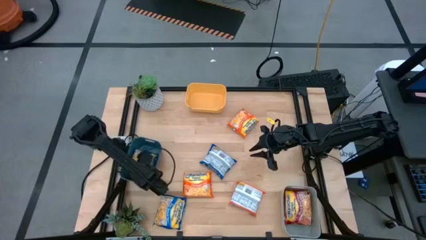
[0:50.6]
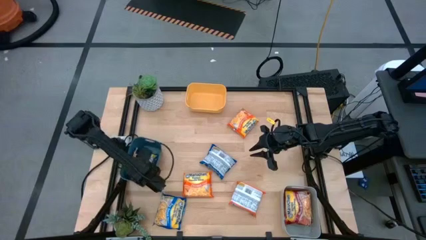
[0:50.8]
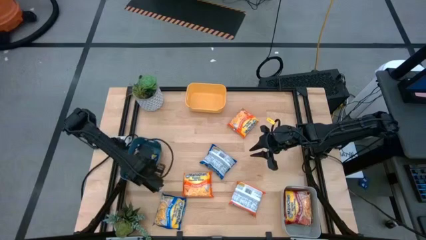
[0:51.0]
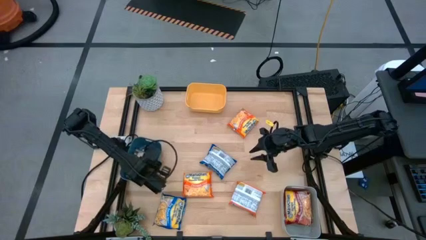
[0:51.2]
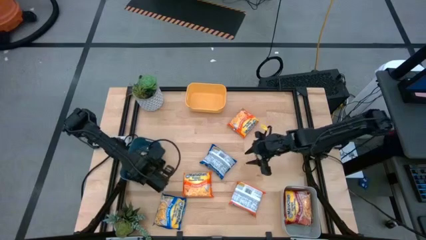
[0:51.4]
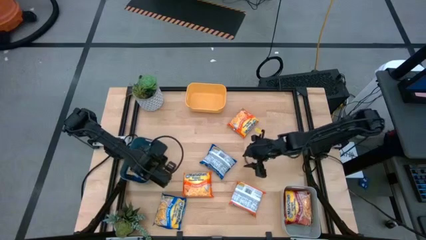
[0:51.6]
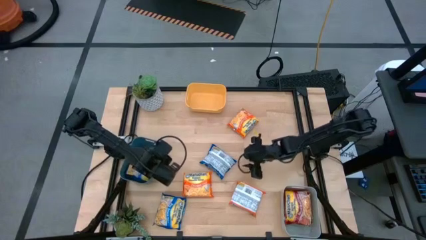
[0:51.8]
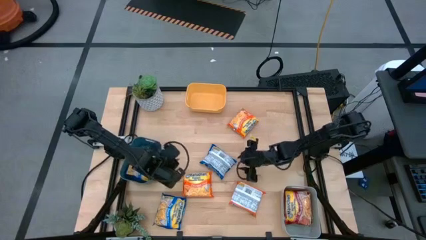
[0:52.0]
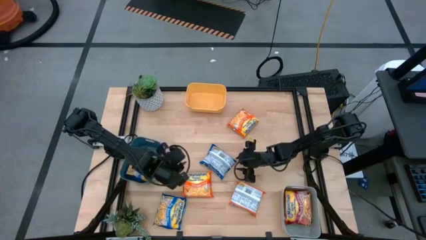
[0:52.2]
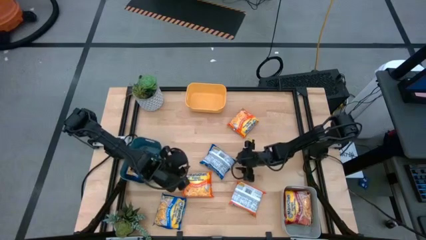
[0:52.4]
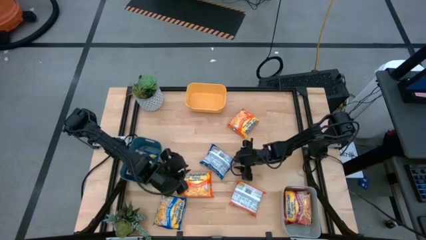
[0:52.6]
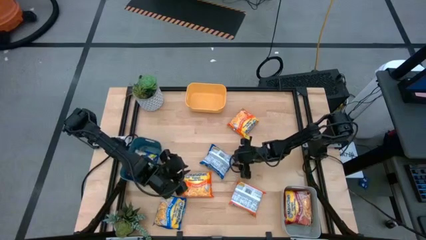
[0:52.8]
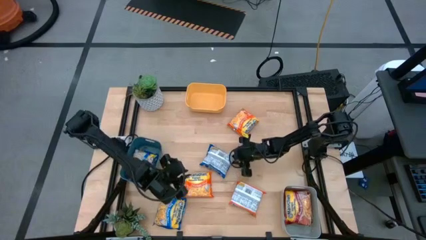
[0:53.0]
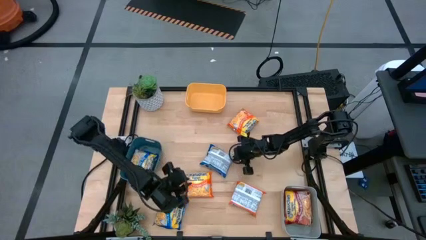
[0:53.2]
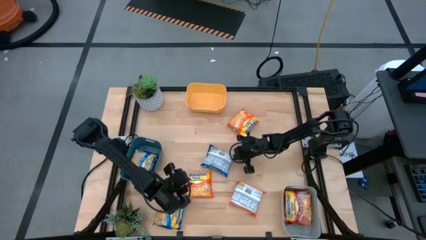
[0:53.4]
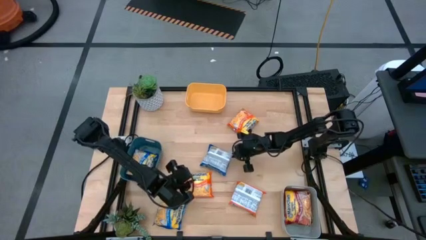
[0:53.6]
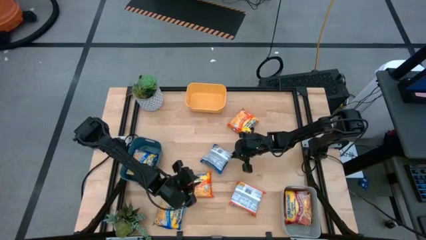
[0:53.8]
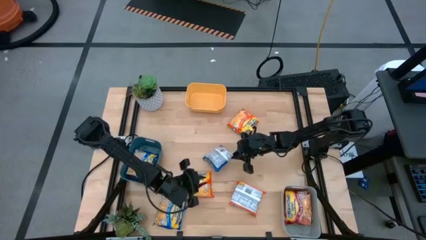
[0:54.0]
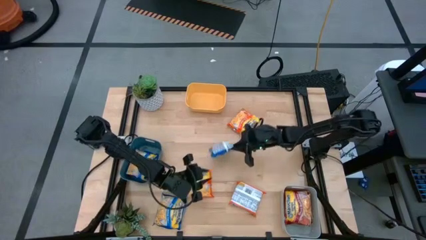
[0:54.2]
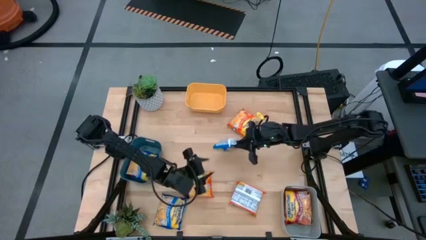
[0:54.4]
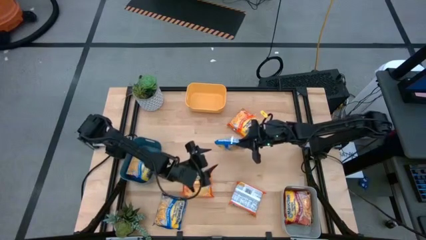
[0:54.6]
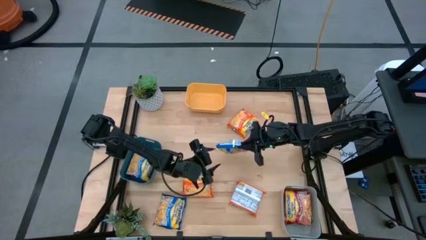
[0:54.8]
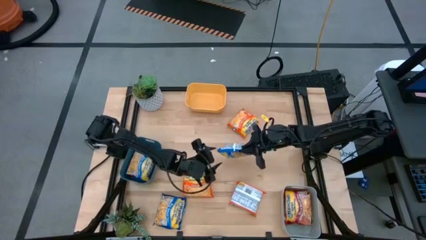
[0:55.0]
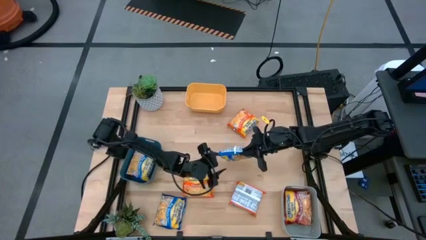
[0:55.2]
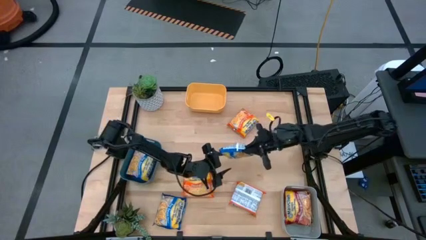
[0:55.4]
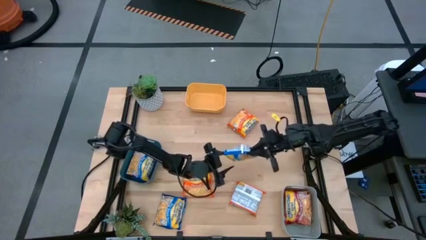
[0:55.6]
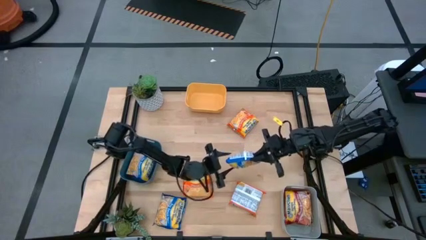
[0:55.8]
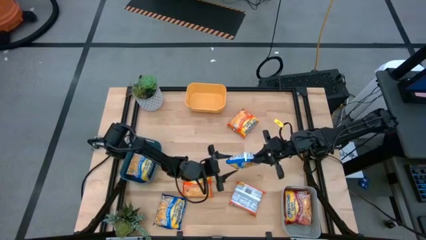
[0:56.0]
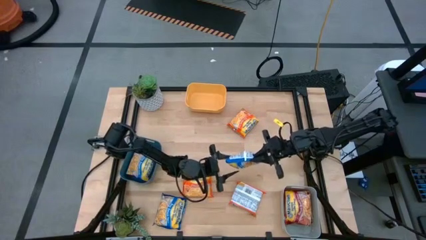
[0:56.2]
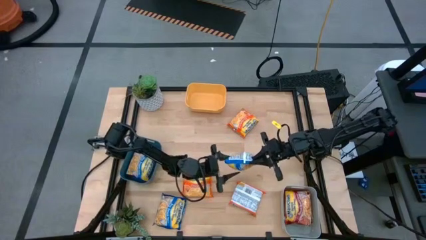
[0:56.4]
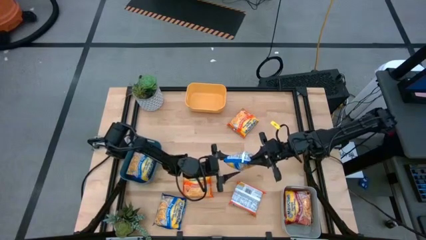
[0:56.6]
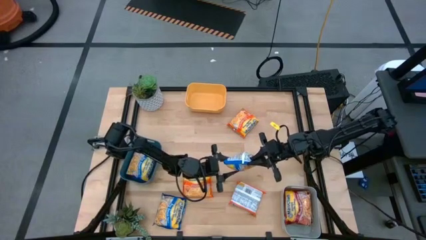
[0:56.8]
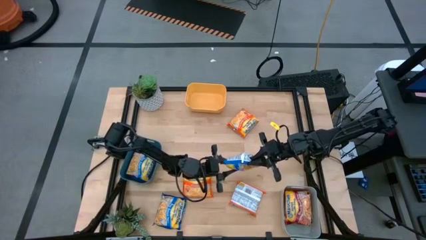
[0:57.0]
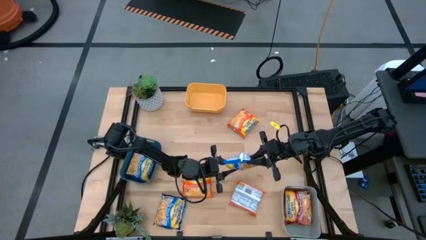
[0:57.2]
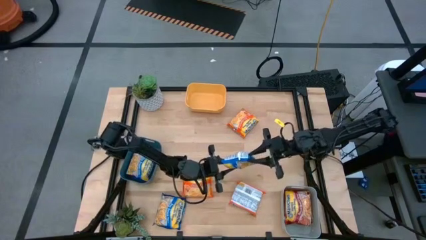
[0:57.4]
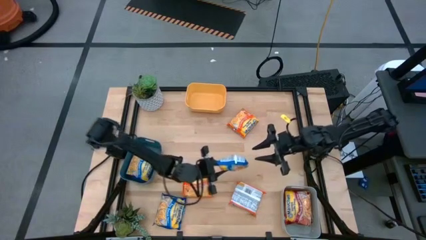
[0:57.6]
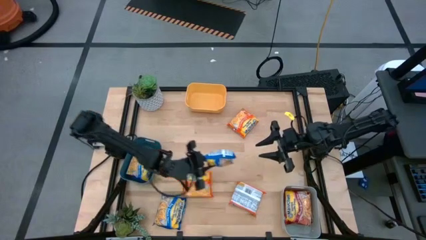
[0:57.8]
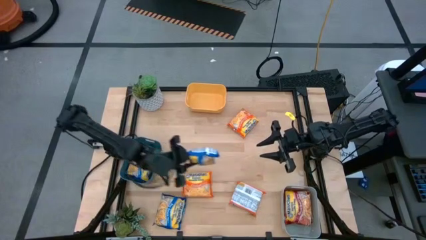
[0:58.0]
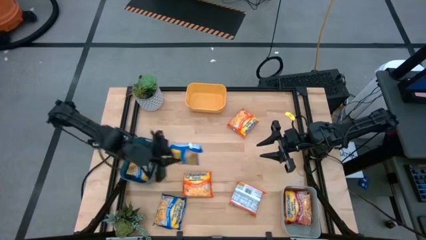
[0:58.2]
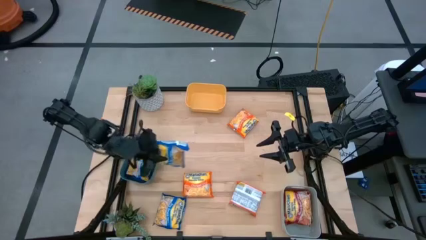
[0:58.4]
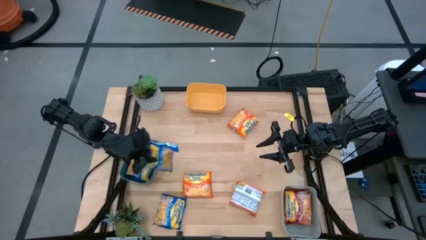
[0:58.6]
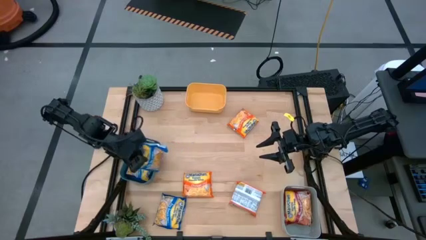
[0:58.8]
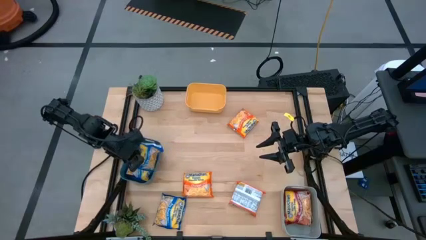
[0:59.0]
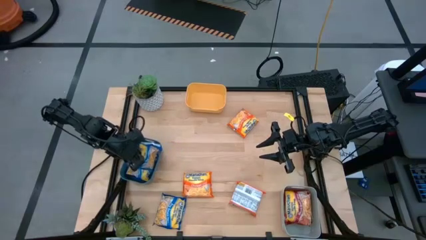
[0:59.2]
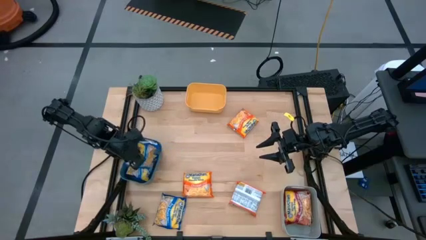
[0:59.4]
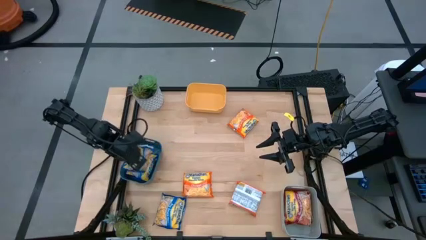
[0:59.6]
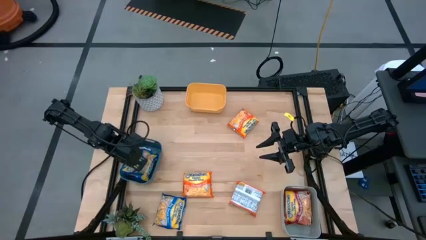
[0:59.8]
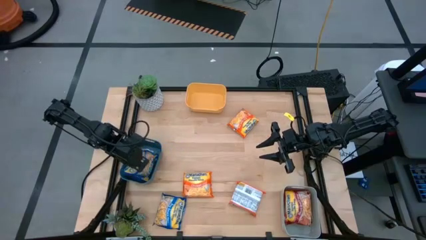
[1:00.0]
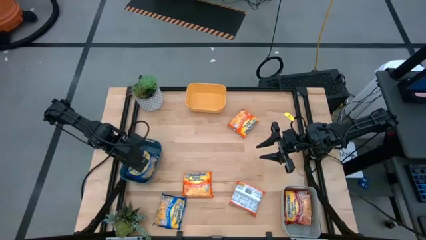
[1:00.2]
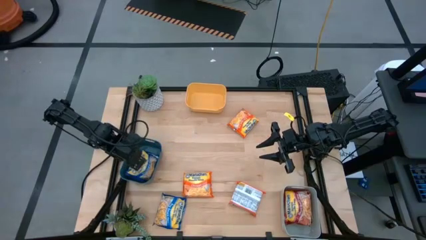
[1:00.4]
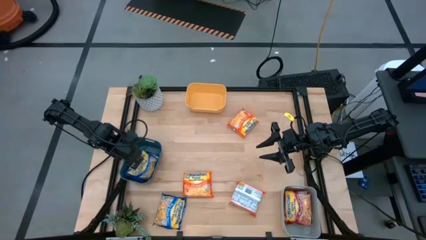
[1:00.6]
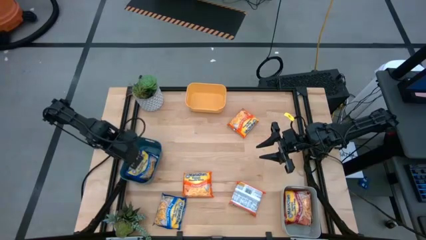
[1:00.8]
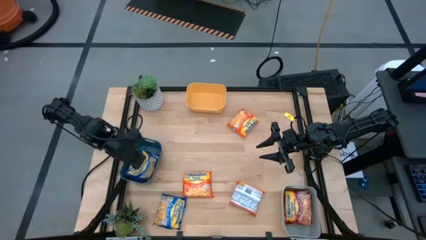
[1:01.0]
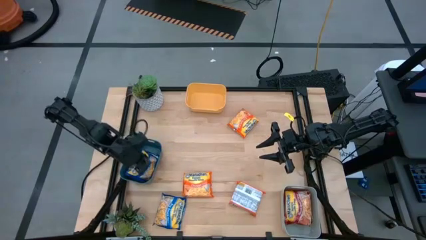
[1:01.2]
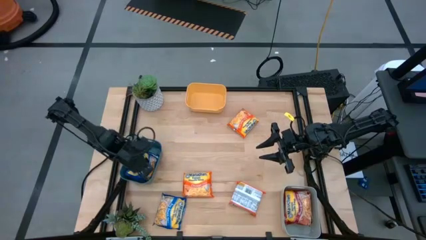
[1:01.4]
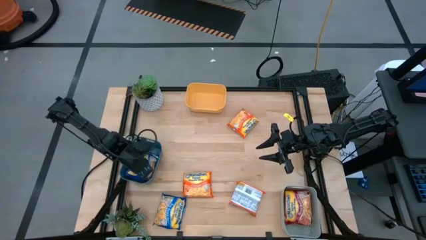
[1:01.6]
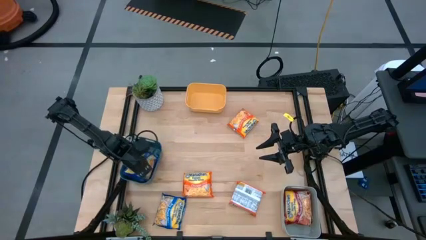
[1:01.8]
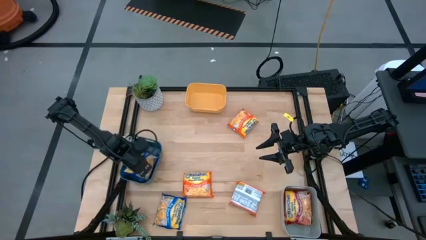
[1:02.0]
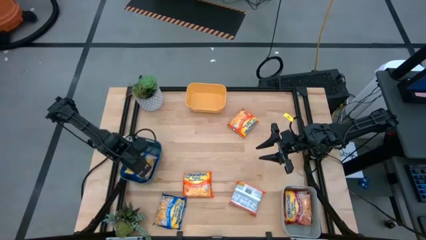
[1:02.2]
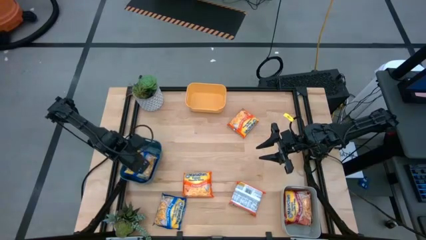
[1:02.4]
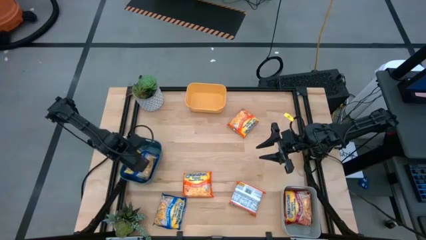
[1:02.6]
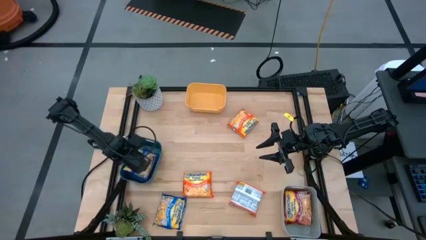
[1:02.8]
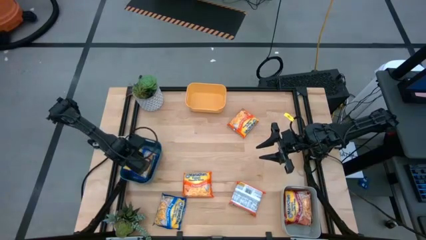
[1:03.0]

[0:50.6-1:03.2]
Task: Sort Maruchan noodles
Put the top blue noodle pack into the blue bin

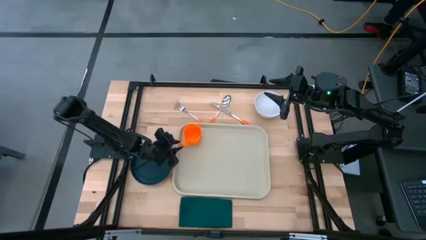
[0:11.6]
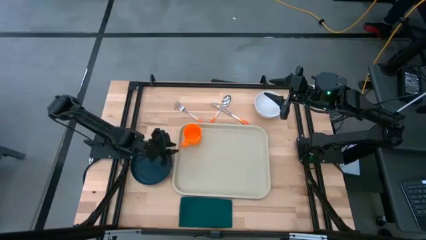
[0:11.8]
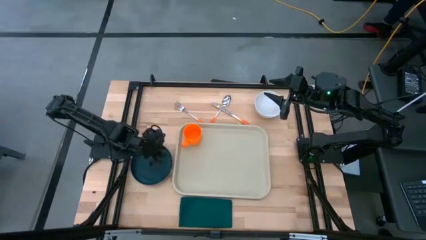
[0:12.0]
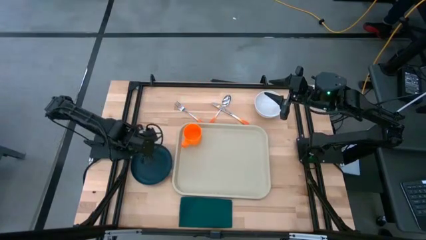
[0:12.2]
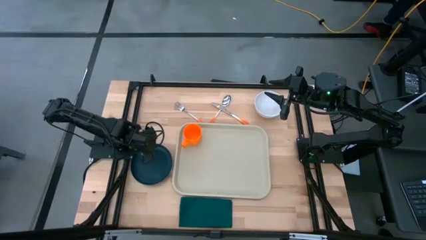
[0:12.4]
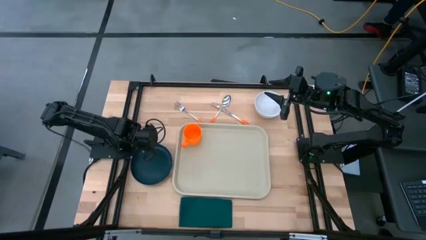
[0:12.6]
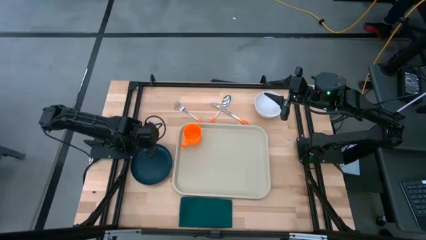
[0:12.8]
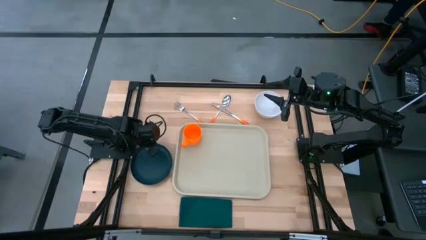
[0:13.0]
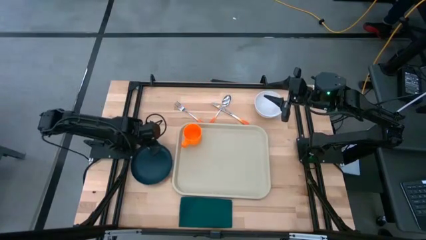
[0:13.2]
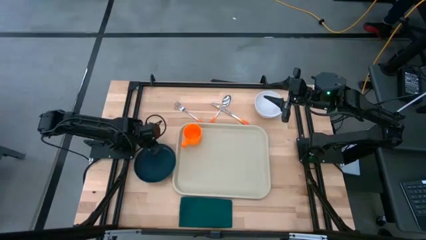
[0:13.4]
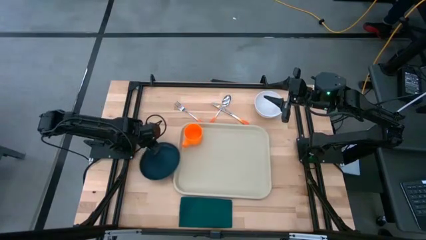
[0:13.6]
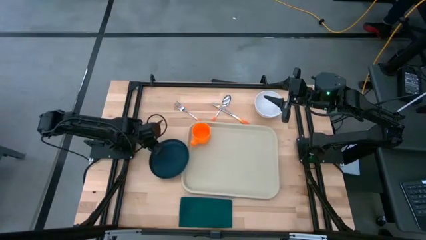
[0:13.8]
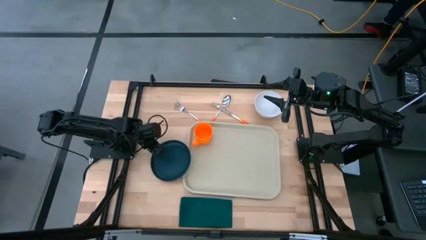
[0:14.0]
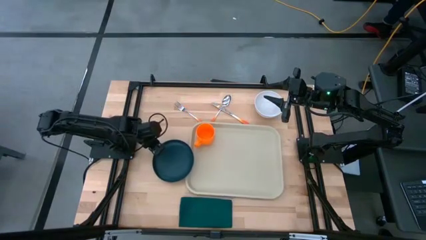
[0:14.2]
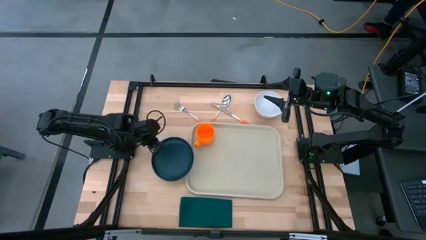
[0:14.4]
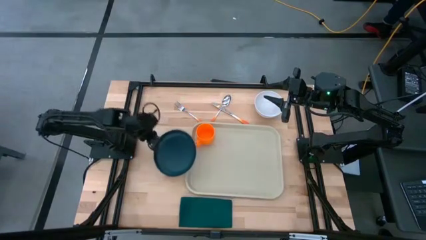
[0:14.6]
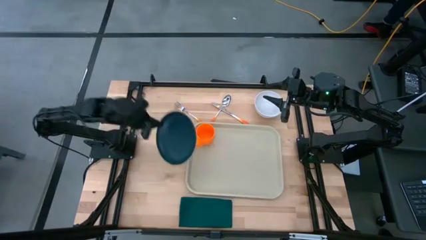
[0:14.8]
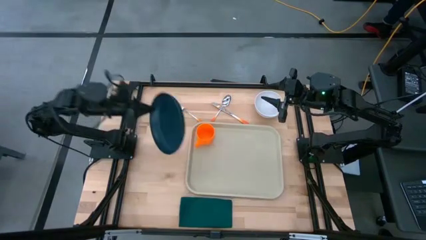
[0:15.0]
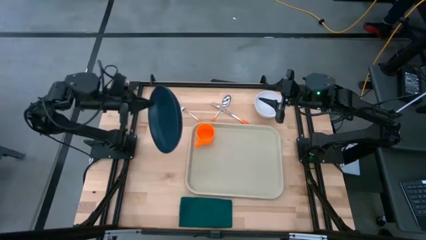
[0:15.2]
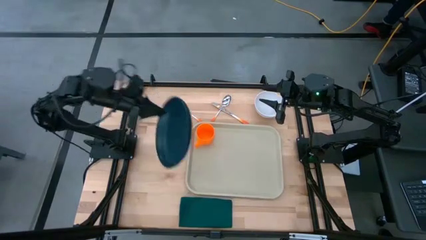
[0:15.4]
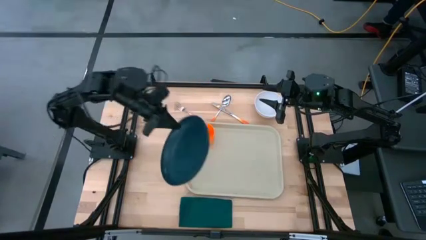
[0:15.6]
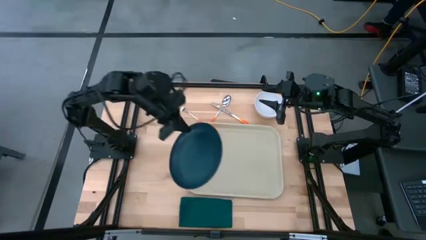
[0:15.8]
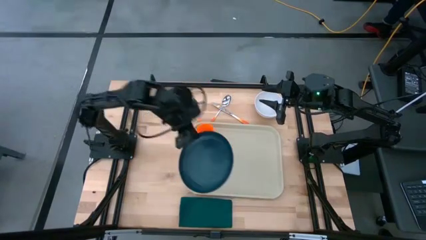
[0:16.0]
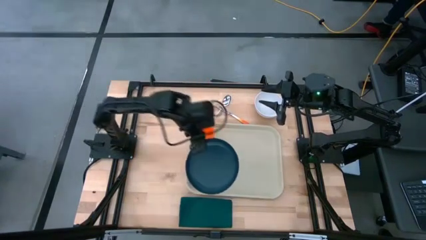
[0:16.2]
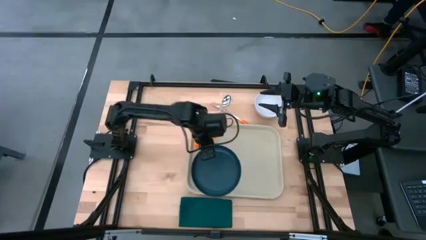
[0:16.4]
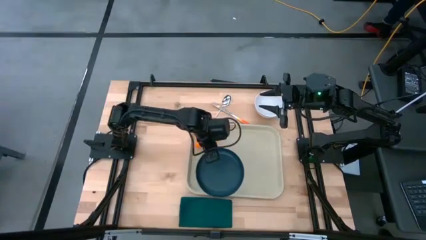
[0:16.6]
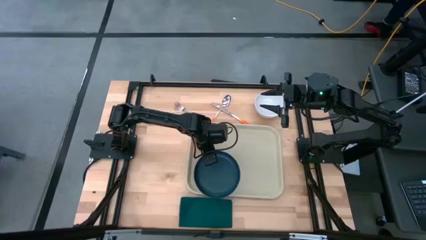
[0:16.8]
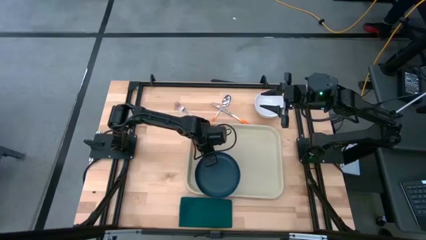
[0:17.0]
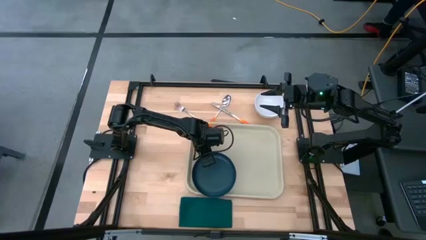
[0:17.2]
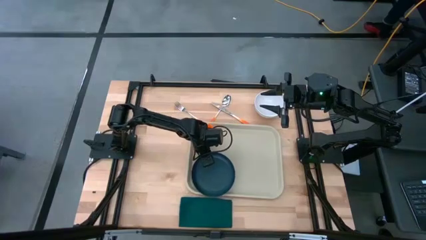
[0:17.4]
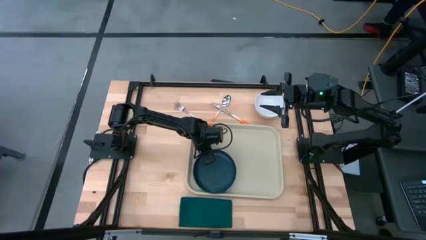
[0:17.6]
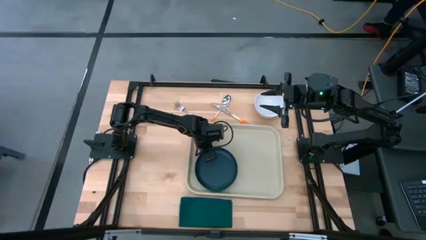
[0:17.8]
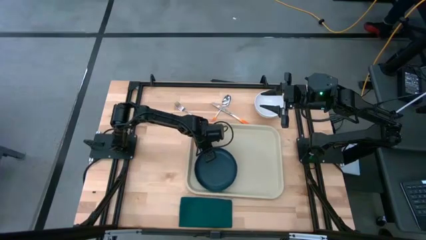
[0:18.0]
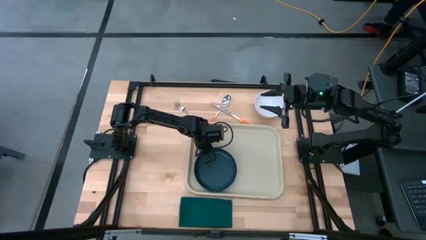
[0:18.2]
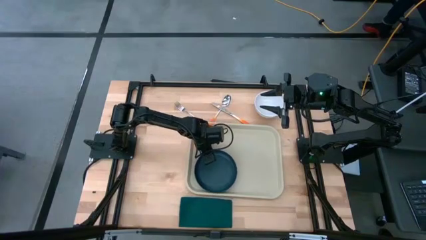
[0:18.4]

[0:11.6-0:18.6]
Task: Set up tray
Put the black plate on the white tray below the orange mug
